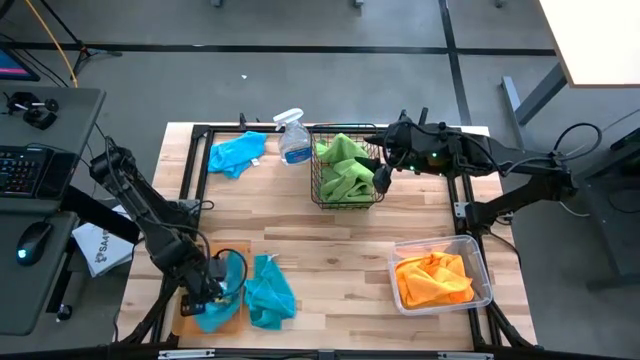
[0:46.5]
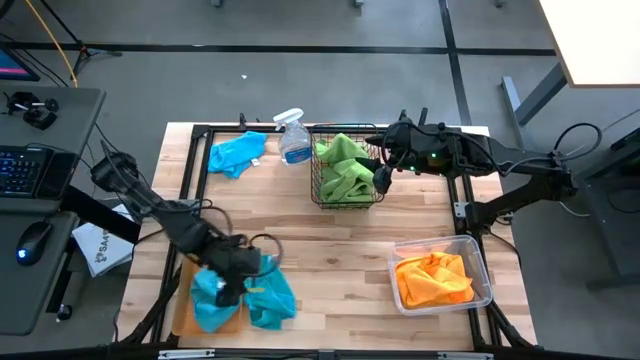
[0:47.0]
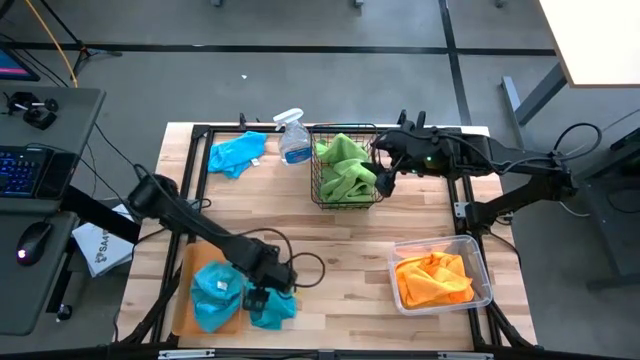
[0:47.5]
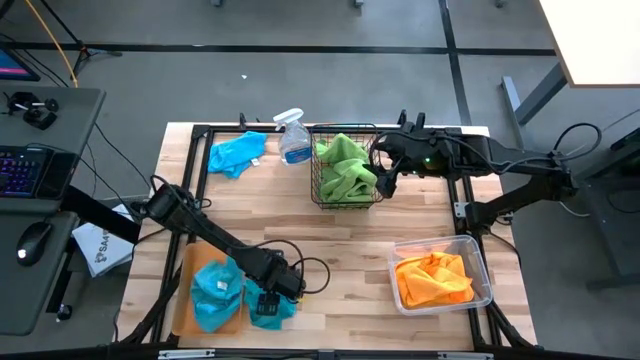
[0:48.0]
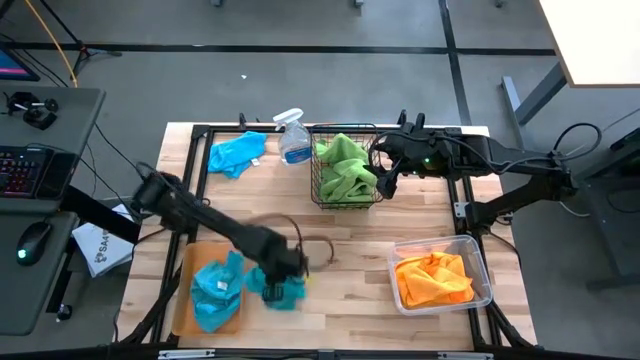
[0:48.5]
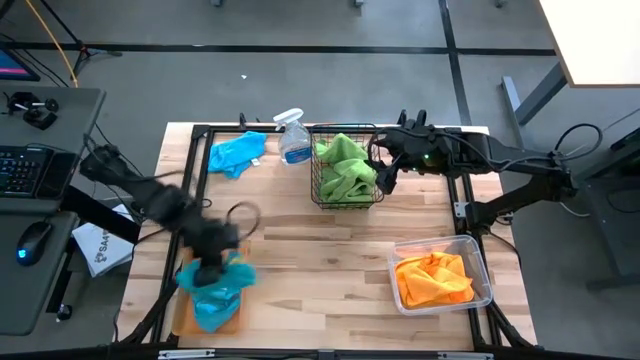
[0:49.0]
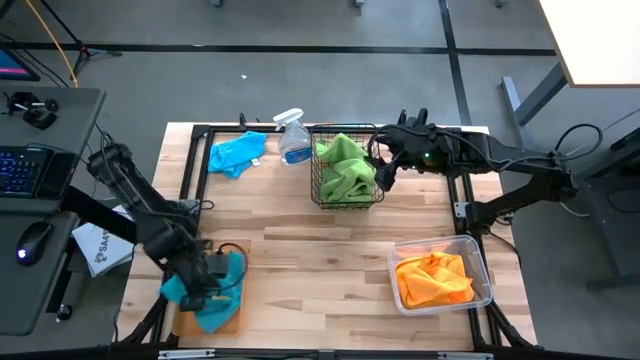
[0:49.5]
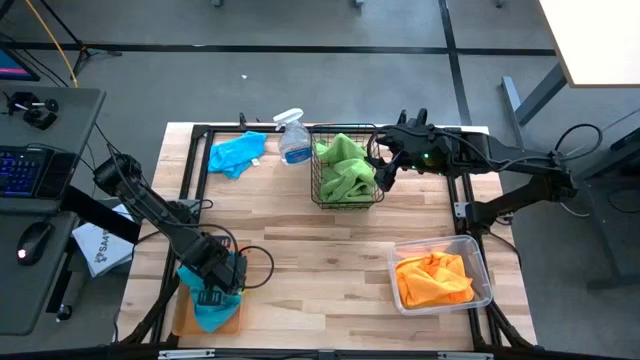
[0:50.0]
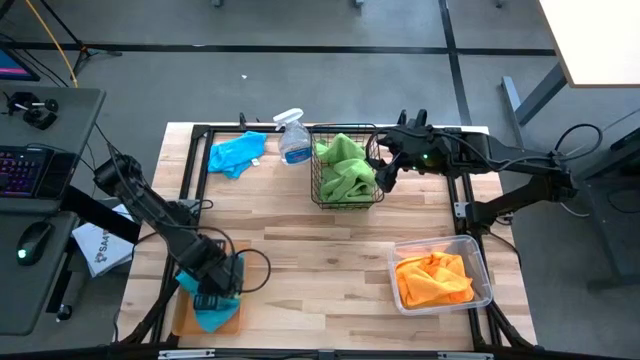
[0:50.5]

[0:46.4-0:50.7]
Task: Sort microfiber towel by color & place in baskets
Put the bottom blue towel into the orange bin

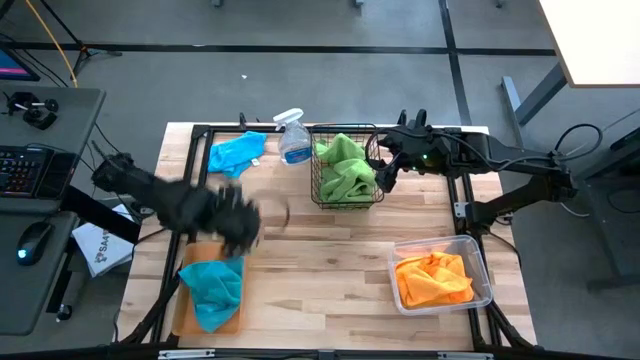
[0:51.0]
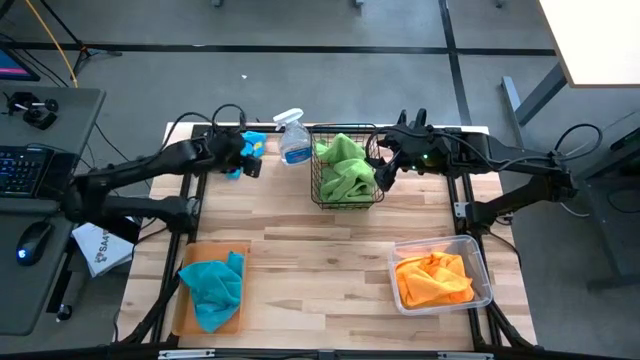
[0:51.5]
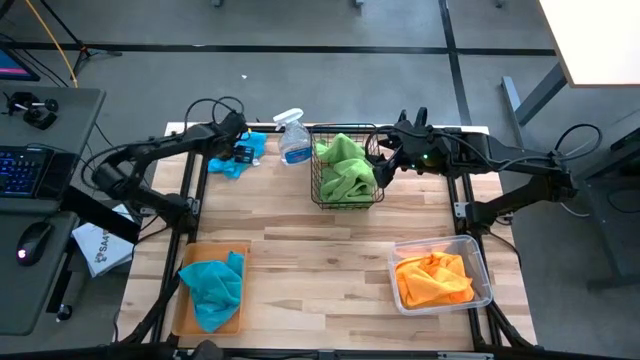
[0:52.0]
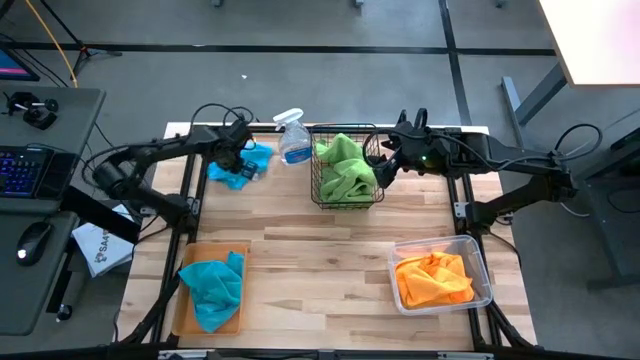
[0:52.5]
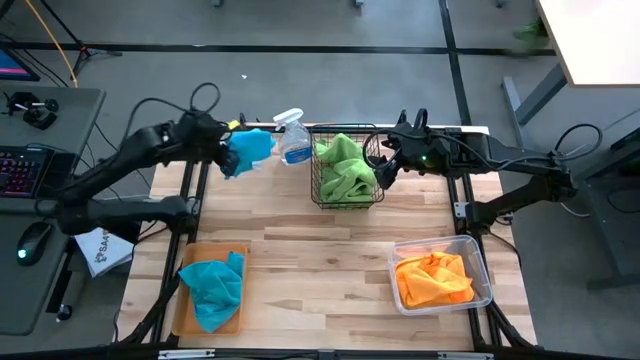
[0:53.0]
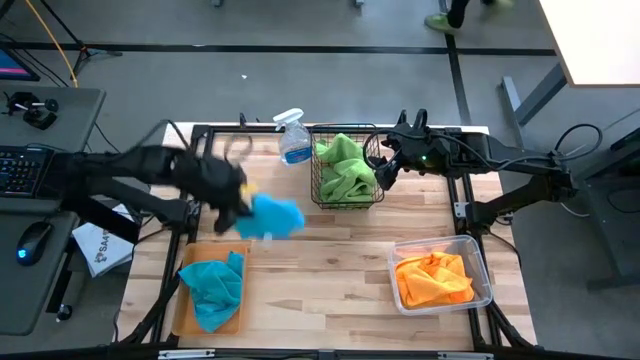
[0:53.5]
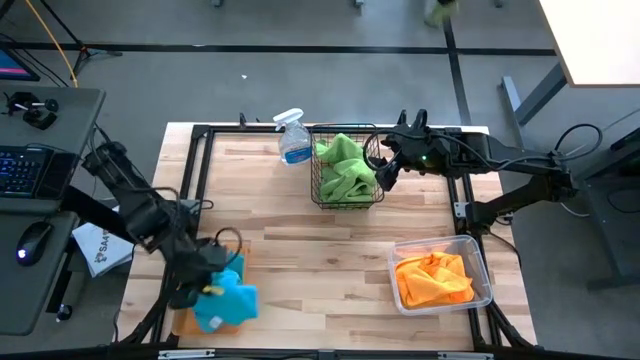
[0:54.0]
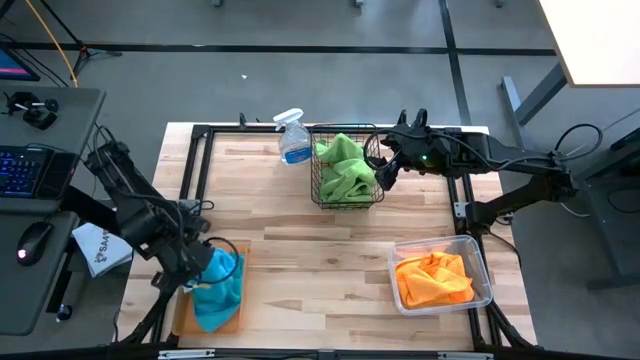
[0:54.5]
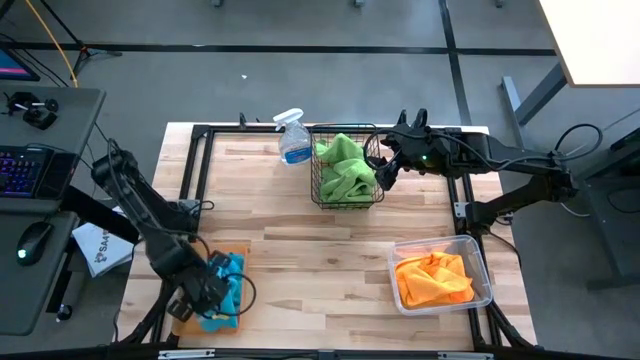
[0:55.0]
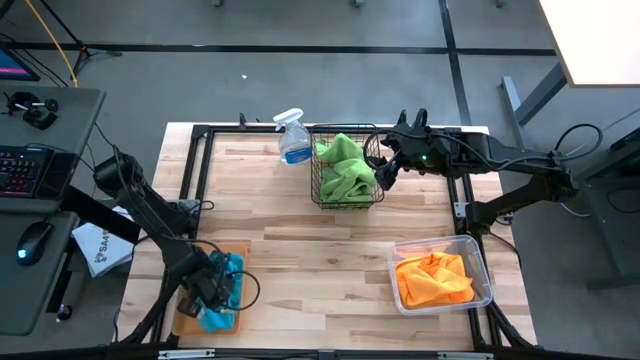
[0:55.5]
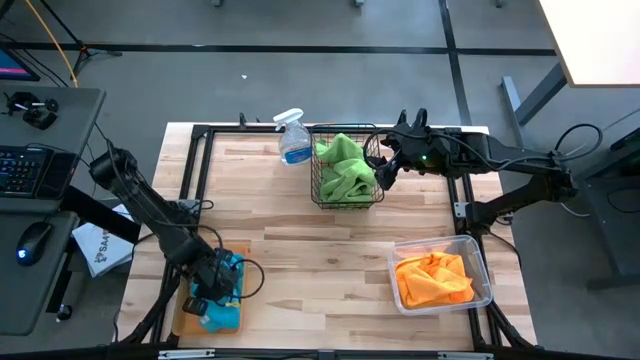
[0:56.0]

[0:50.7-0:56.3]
Put the blue towel into the orange bin

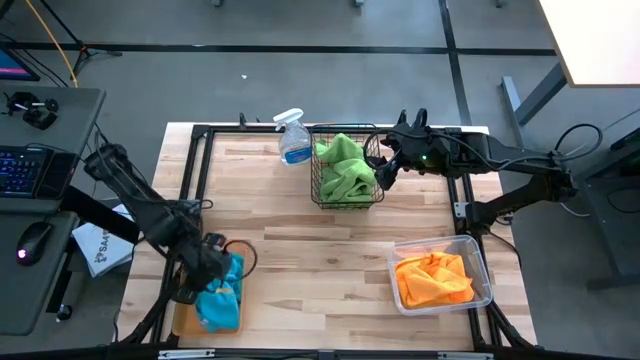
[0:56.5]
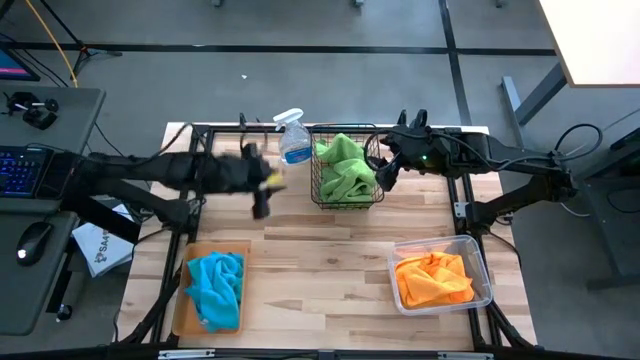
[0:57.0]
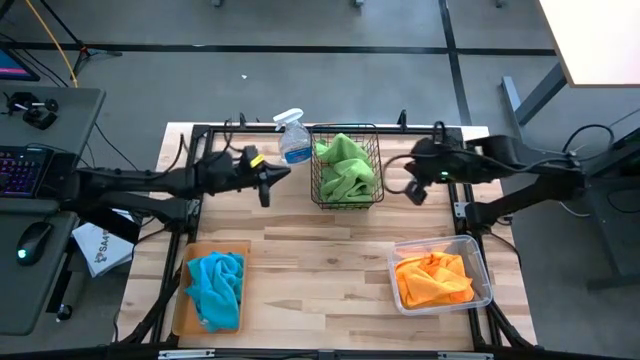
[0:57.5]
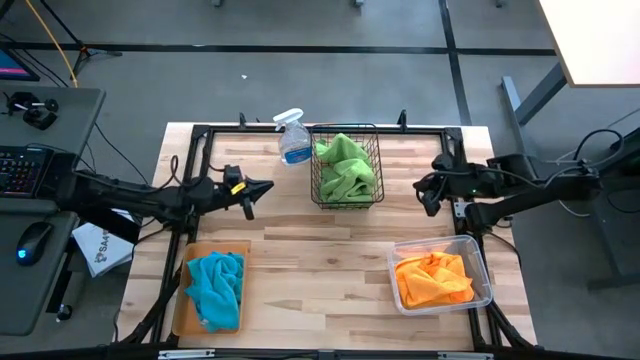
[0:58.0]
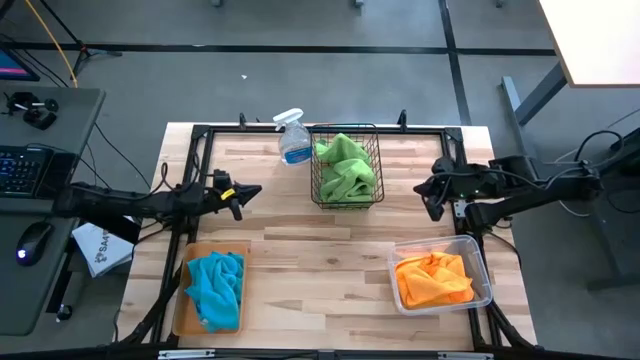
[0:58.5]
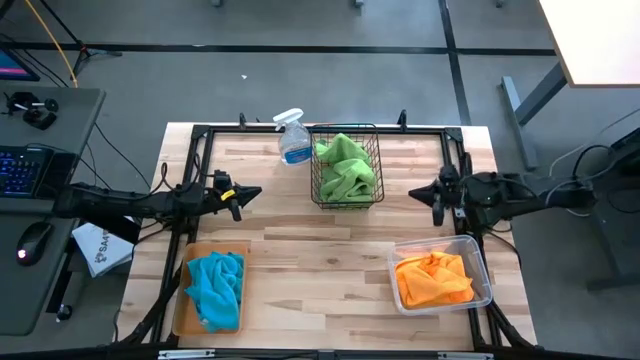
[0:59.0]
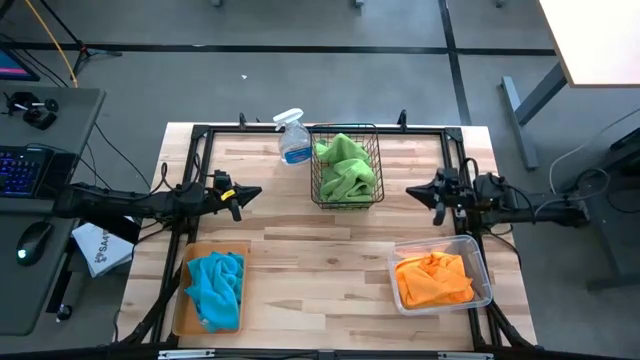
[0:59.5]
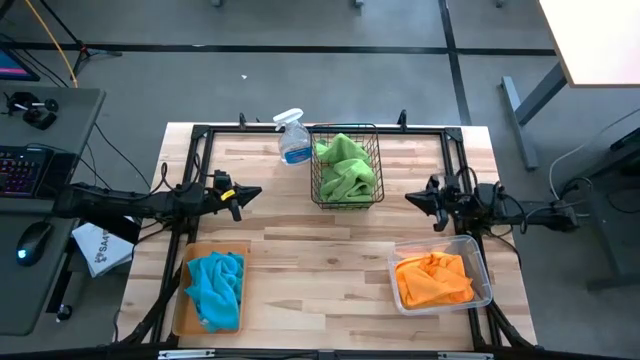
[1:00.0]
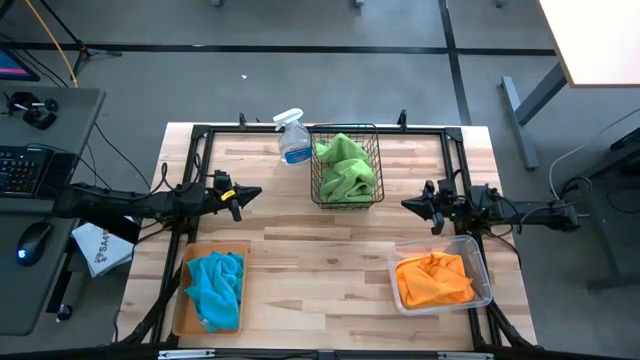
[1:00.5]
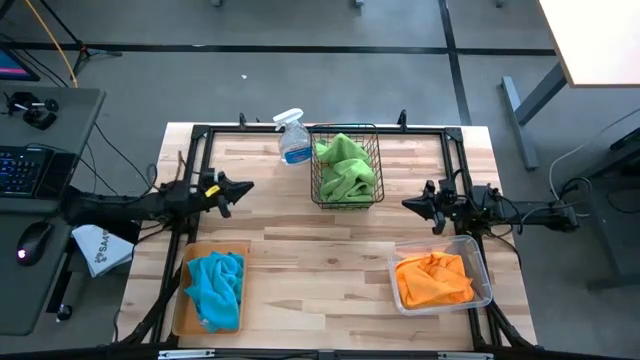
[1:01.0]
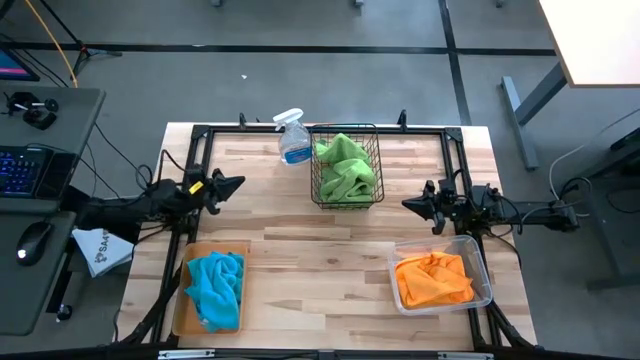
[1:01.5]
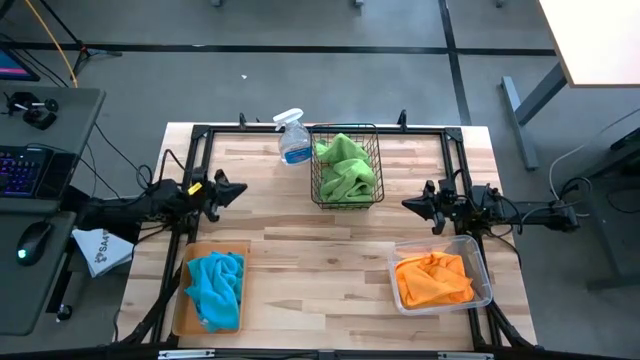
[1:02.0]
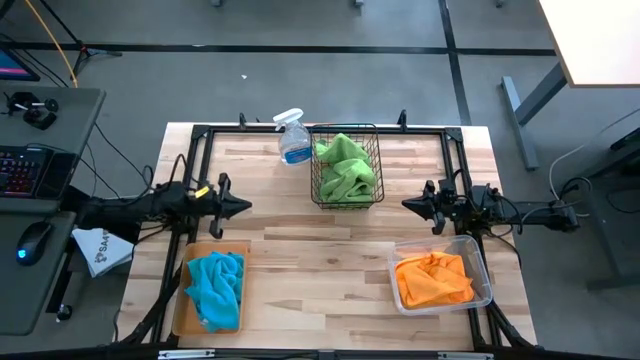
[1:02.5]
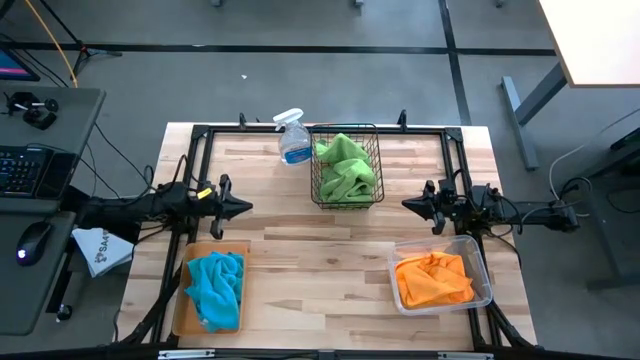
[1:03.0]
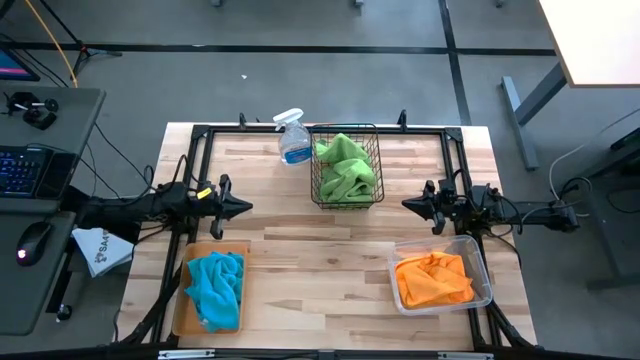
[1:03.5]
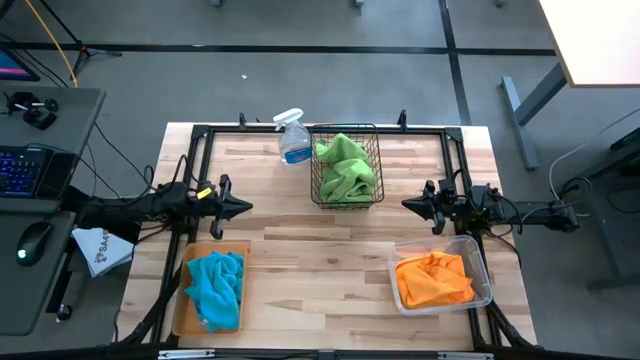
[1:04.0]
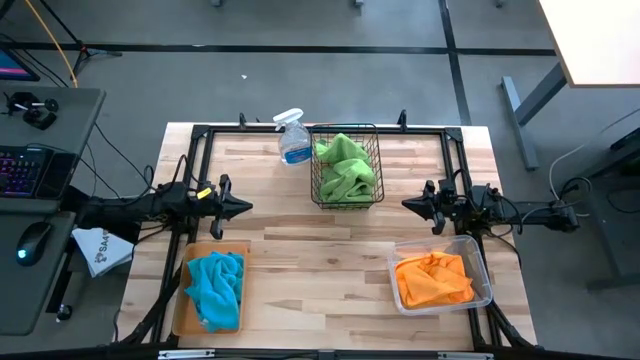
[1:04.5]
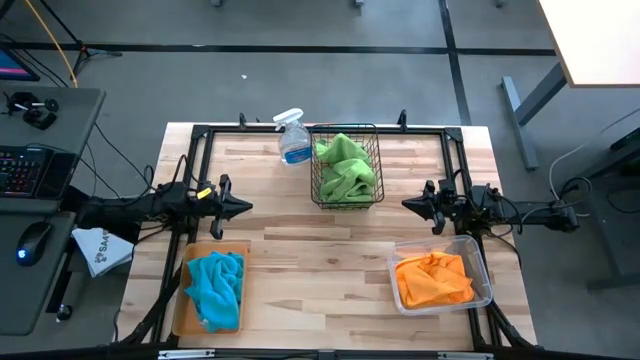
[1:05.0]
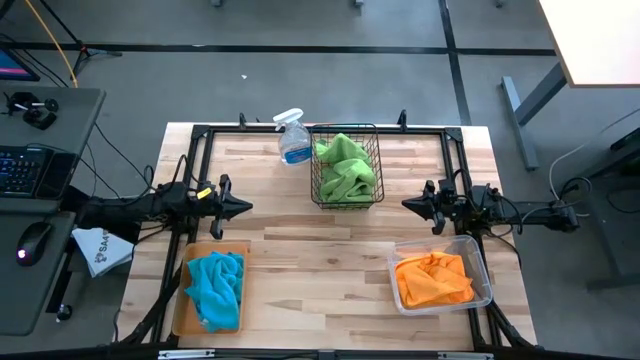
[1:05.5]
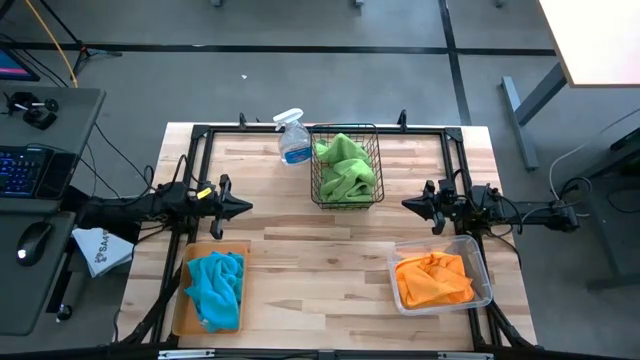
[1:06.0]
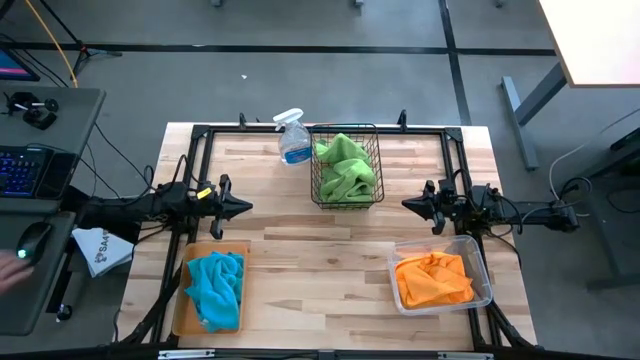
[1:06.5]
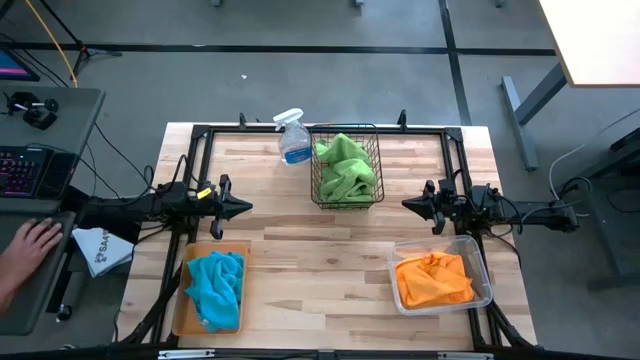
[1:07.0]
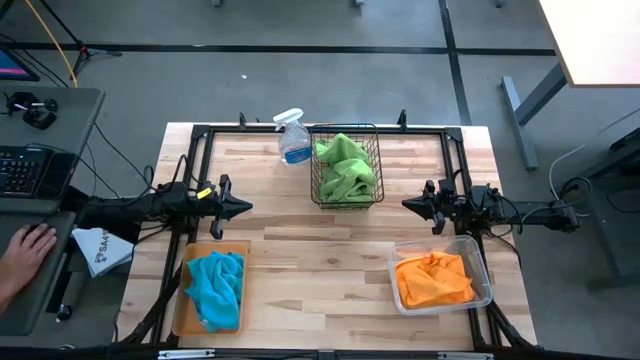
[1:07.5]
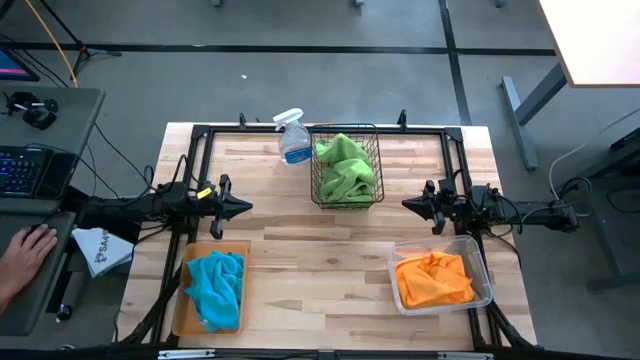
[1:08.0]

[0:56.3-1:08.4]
Return to Home Position
